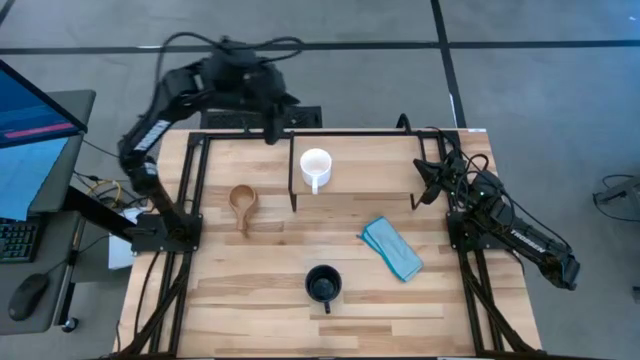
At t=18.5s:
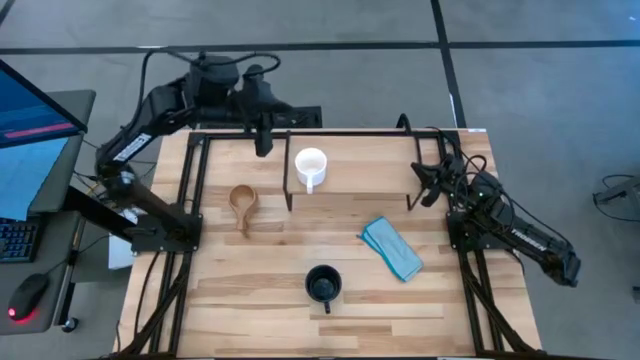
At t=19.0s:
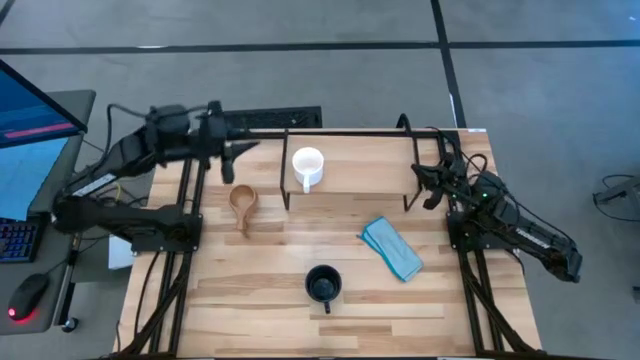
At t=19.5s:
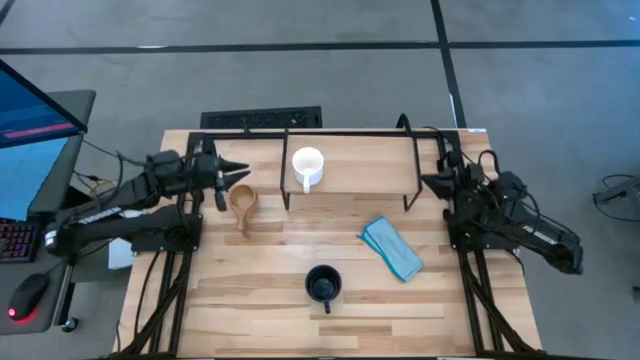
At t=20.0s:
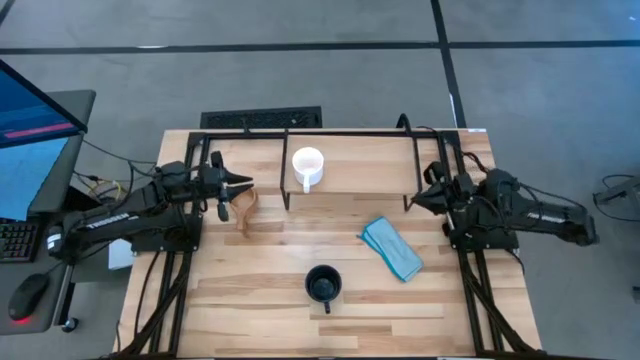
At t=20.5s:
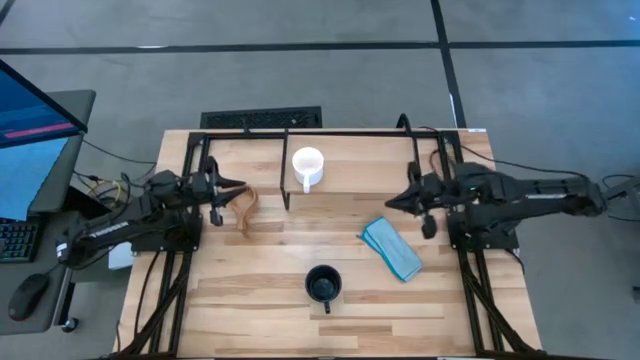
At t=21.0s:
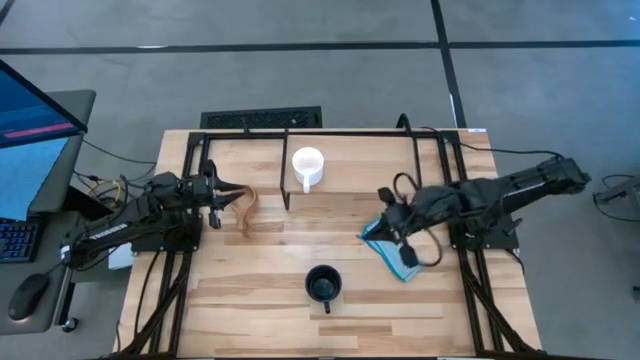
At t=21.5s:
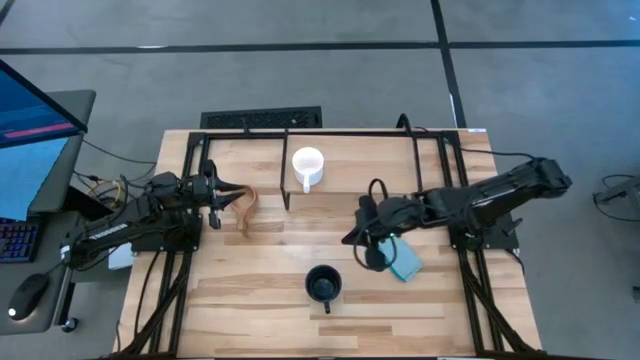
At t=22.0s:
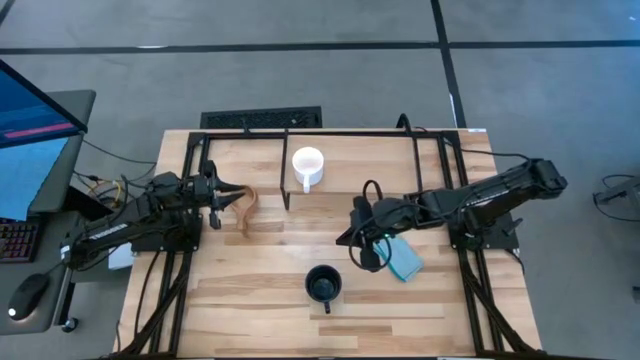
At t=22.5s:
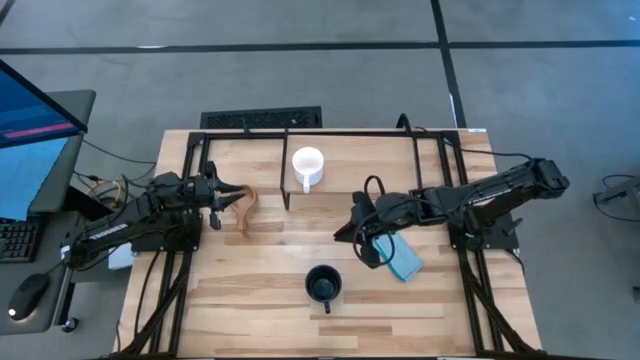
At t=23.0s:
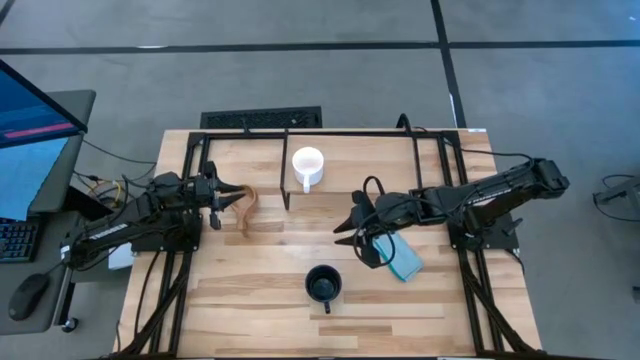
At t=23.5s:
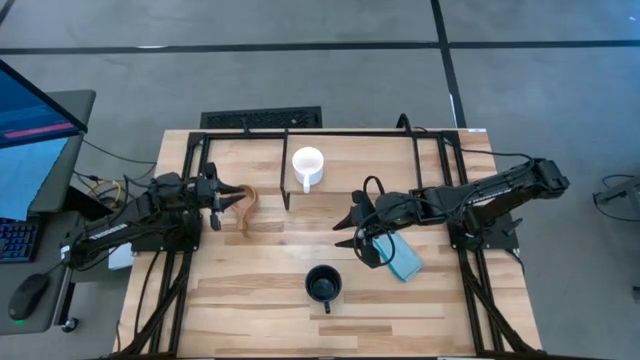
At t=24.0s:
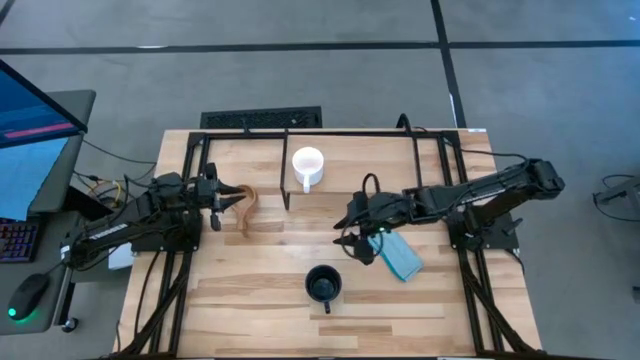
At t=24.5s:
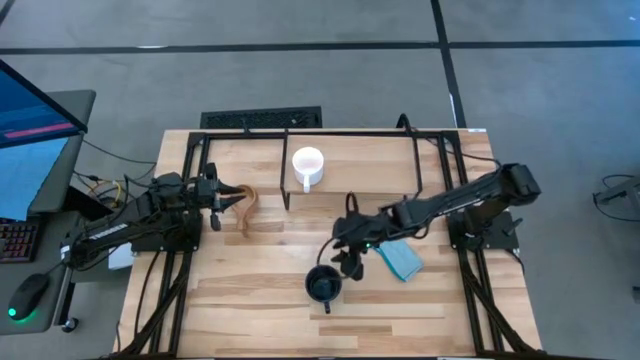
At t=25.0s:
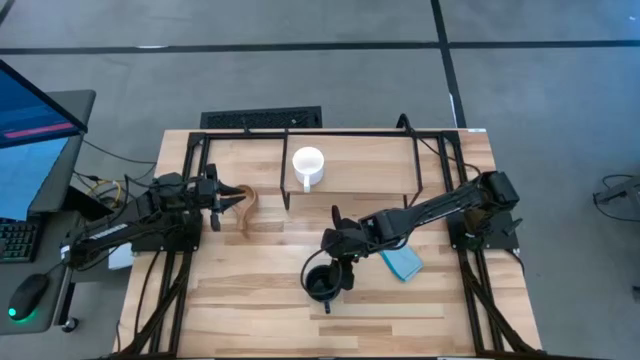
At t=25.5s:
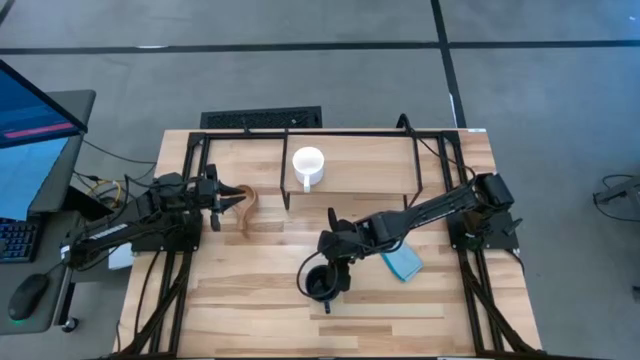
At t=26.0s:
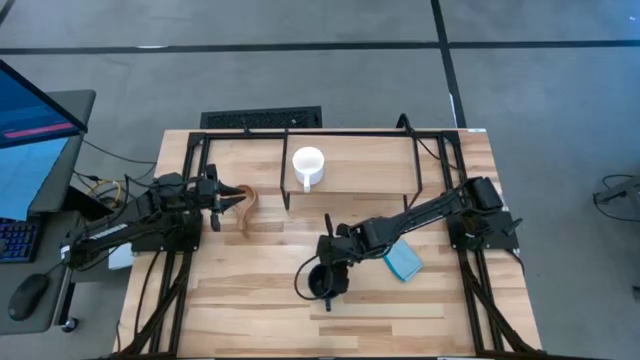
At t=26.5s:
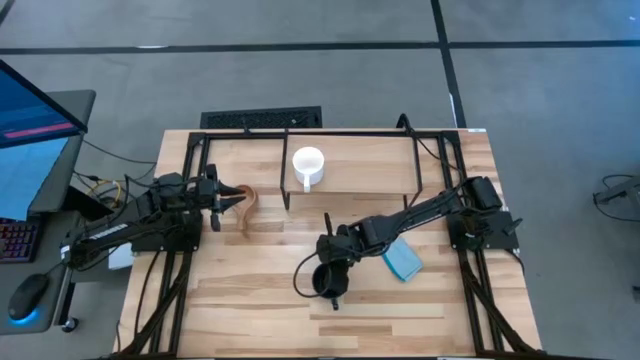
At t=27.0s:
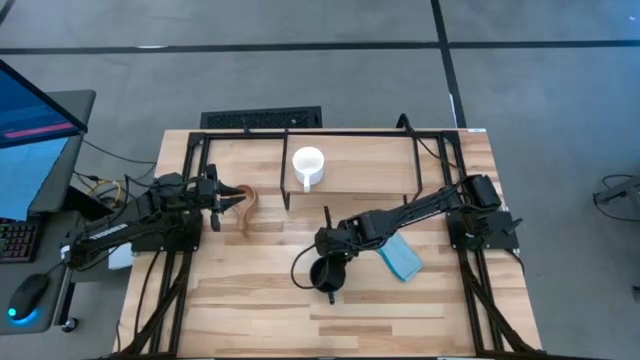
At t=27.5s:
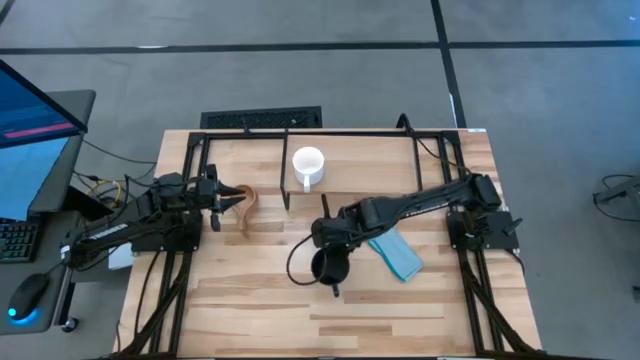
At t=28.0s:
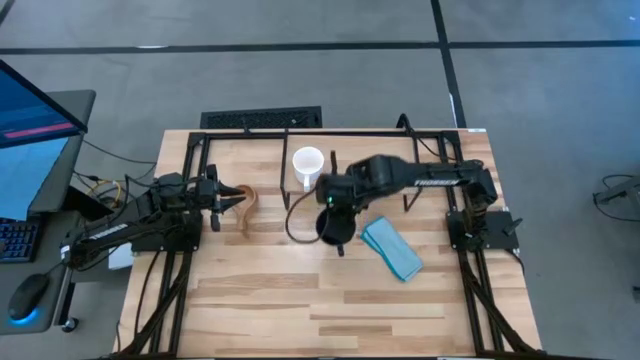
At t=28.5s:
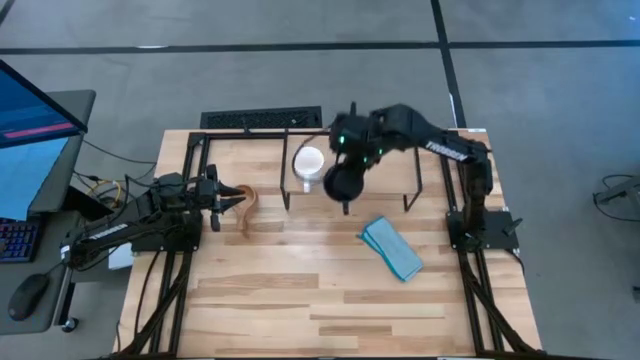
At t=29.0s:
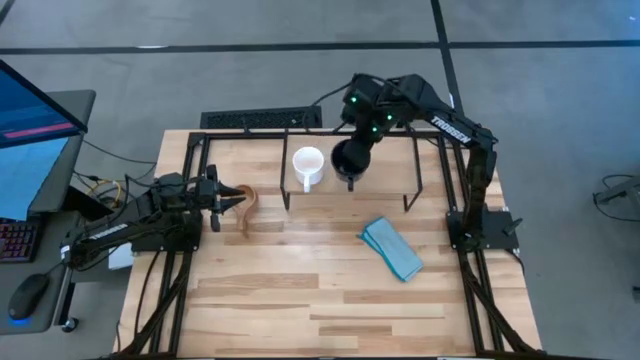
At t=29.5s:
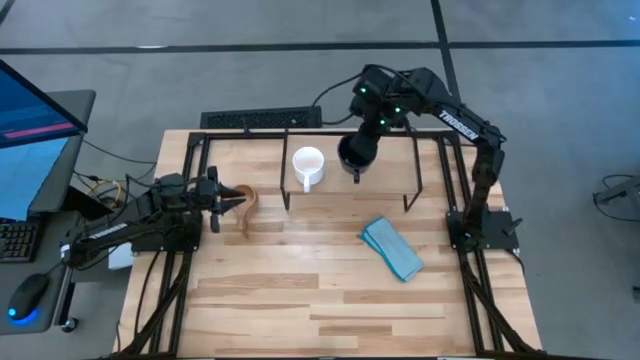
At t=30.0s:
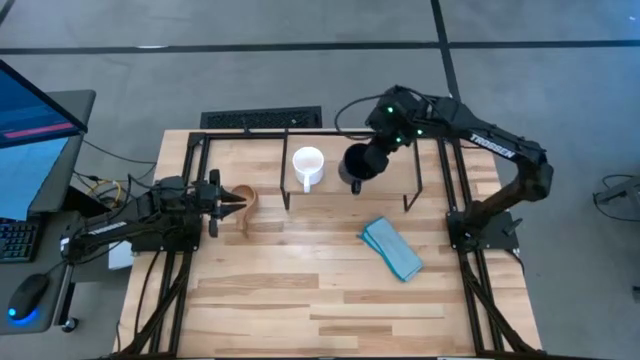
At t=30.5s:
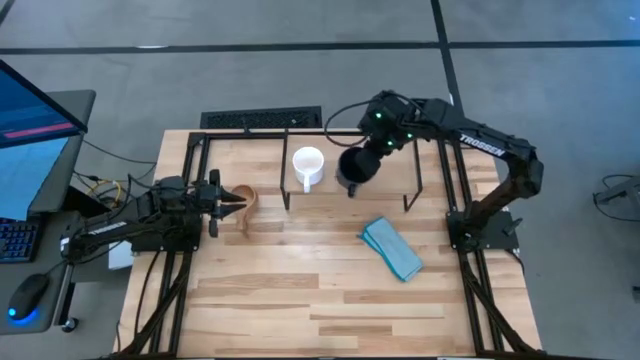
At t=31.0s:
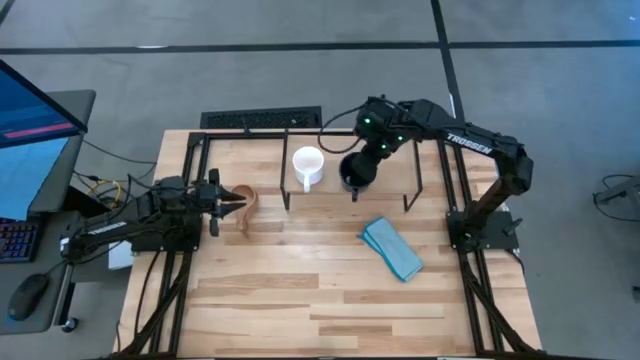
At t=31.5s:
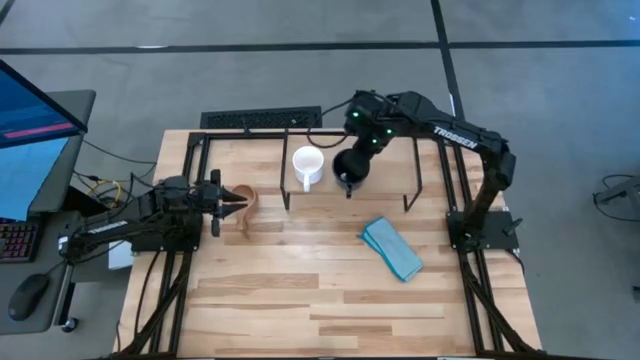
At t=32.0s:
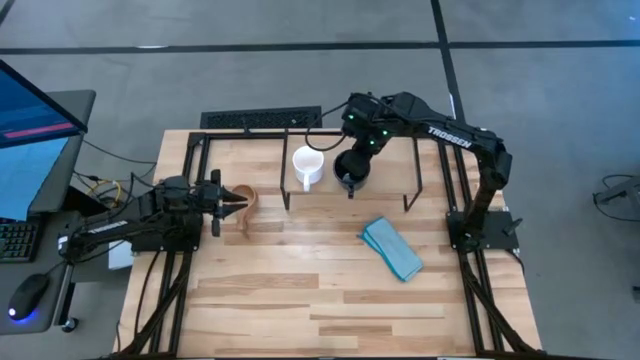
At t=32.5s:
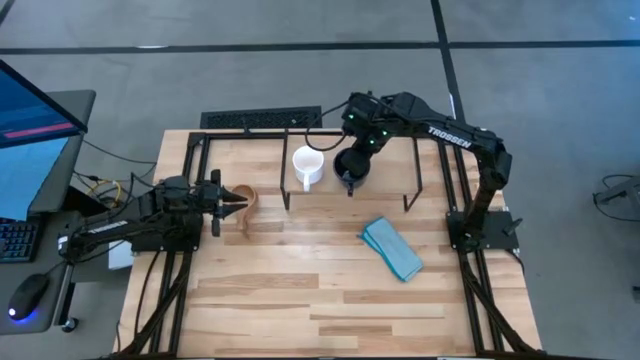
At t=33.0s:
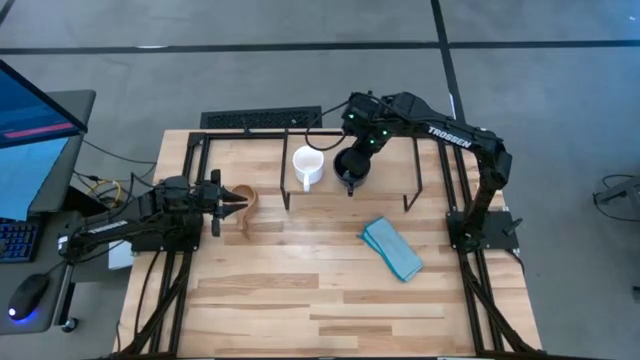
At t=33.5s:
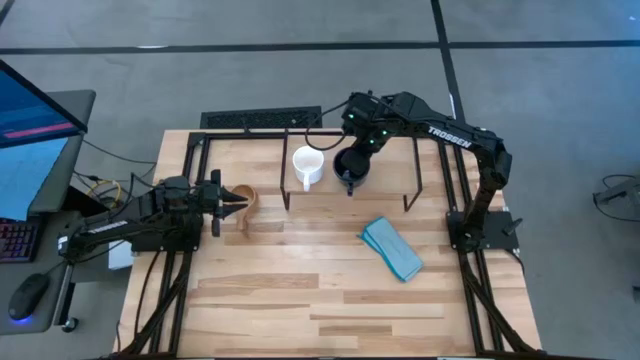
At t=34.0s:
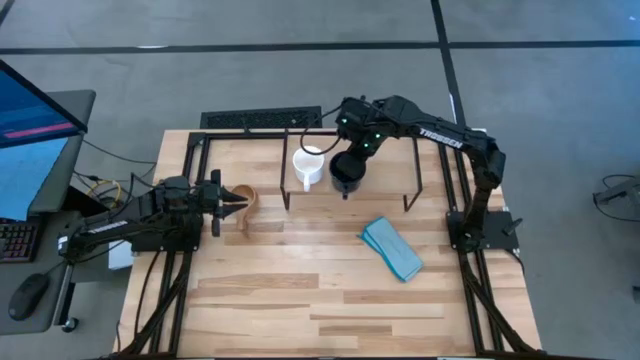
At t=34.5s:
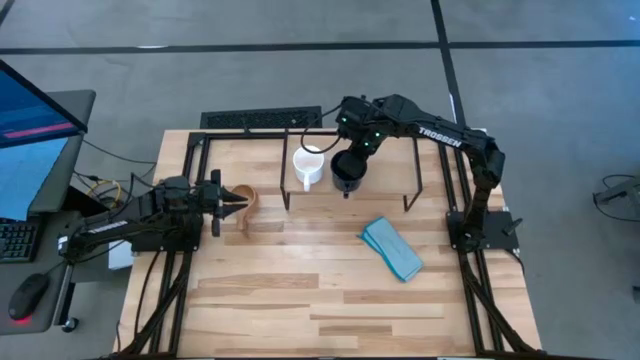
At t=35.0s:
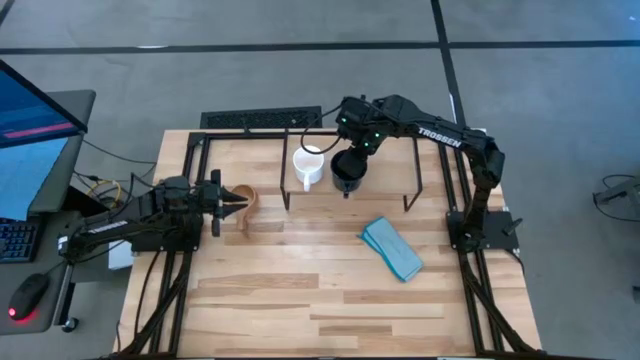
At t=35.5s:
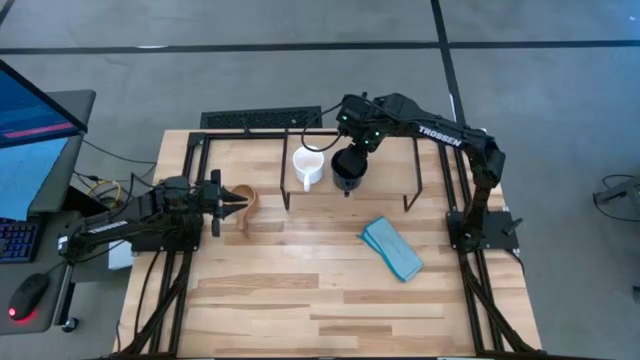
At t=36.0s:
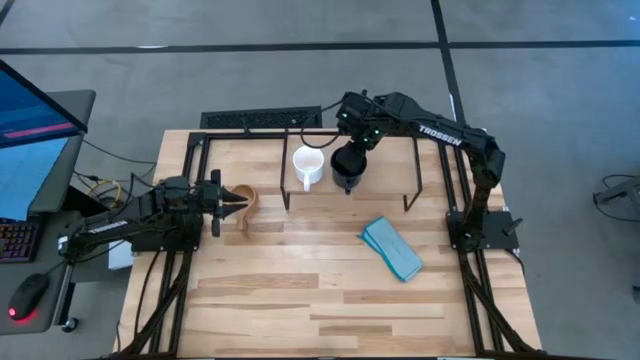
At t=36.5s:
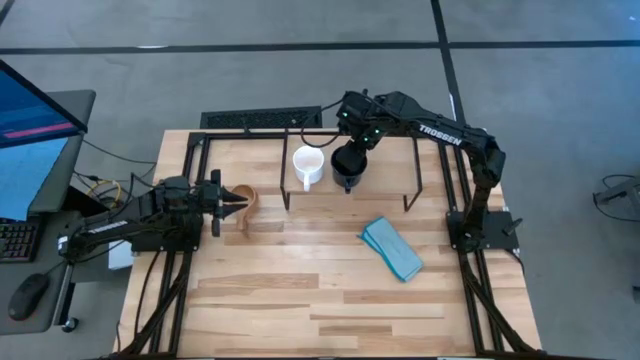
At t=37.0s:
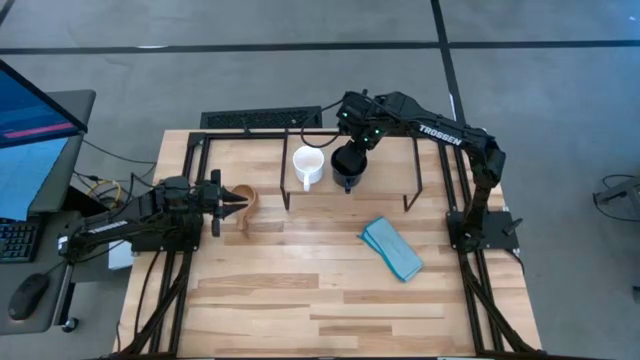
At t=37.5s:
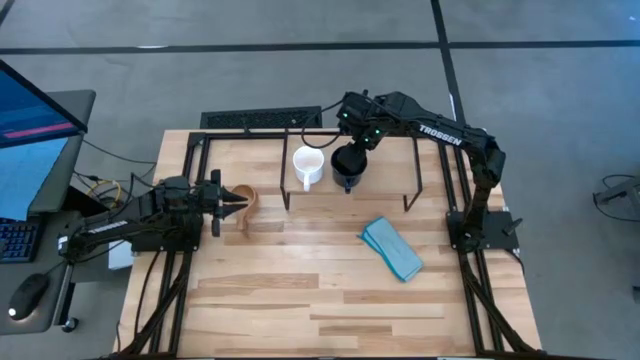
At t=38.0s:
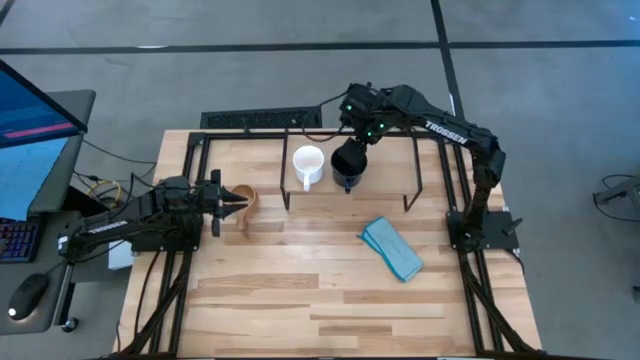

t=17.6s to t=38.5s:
Task: Stack small to large cups/mugs on shelf
Put the black mug on the shelf

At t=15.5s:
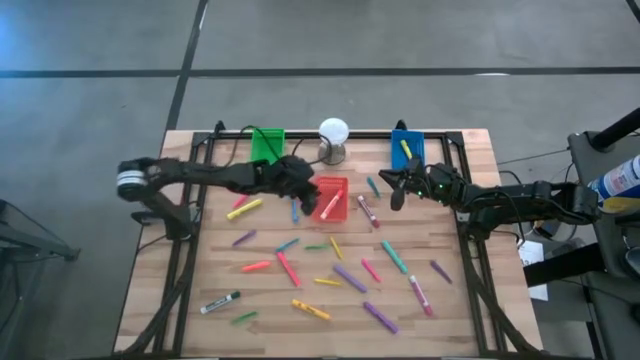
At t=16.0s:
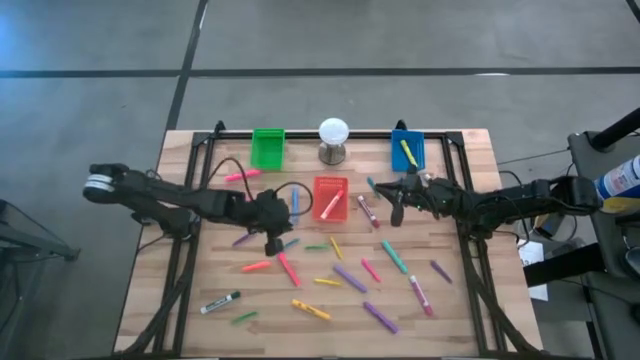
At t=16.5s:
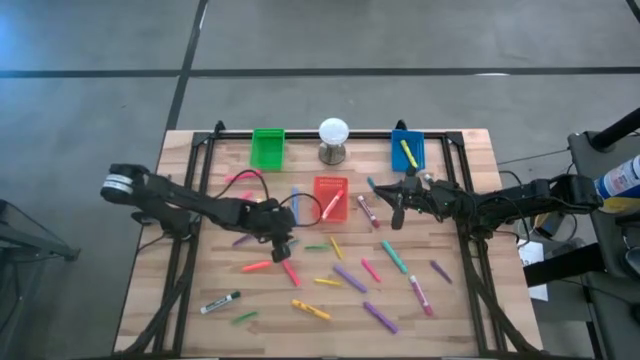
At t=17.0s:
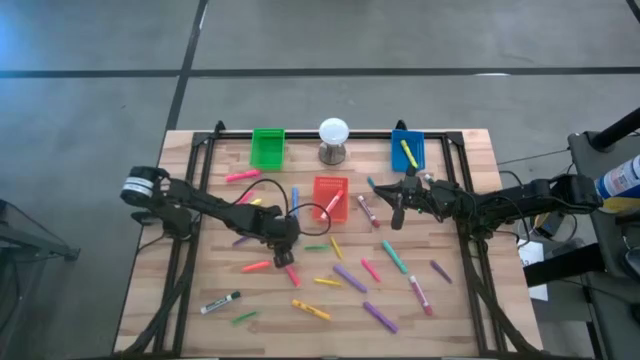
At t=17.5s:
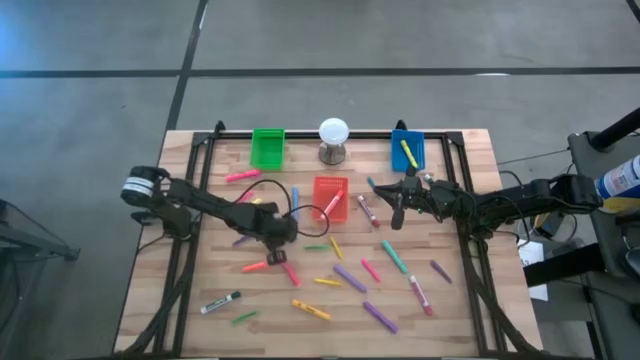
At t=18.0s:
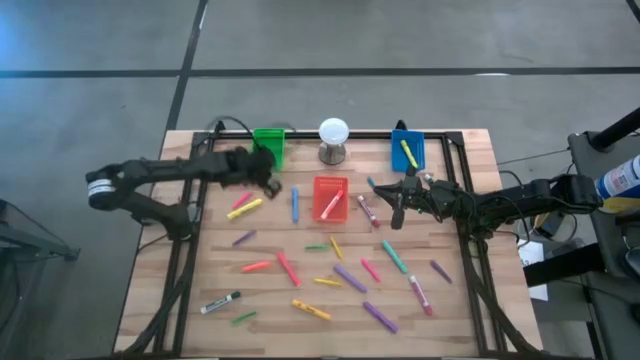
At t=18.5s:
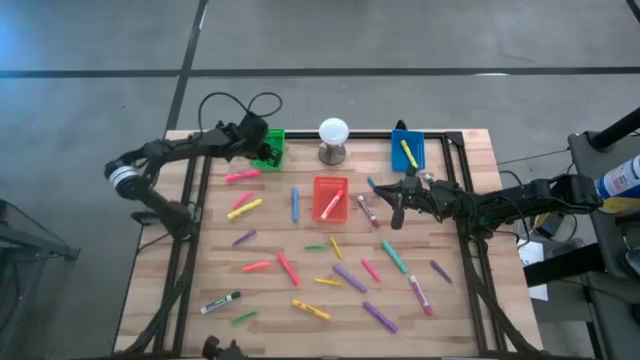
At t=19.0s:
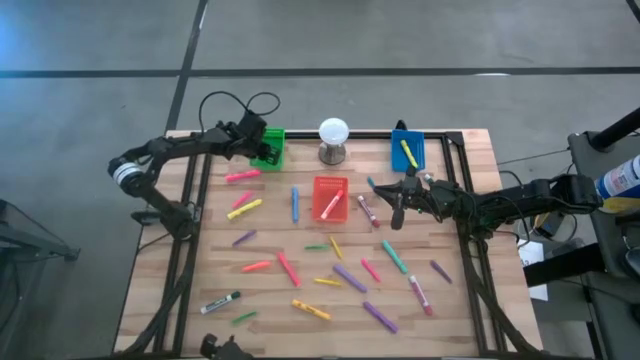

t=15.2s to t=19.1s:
Task: Pick & Place Markers
Put the bottom blue pen into the green bin
